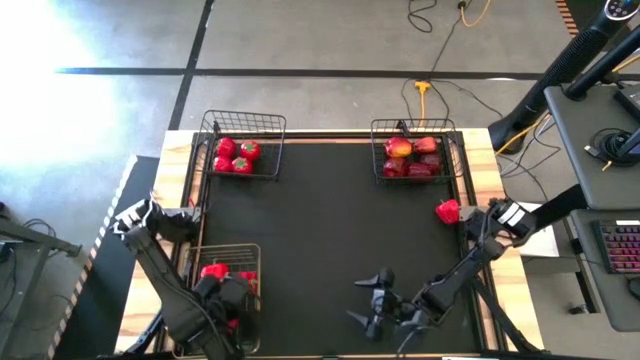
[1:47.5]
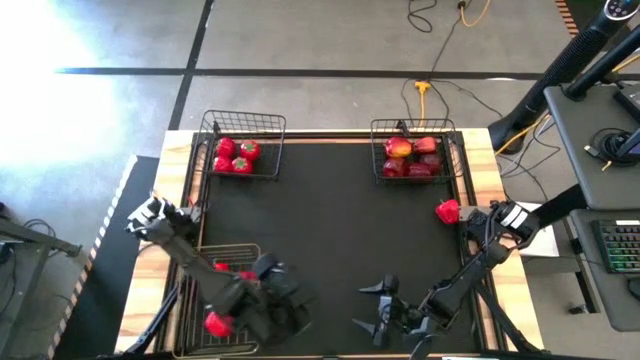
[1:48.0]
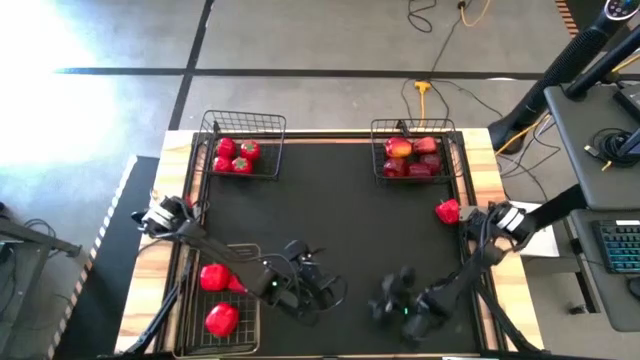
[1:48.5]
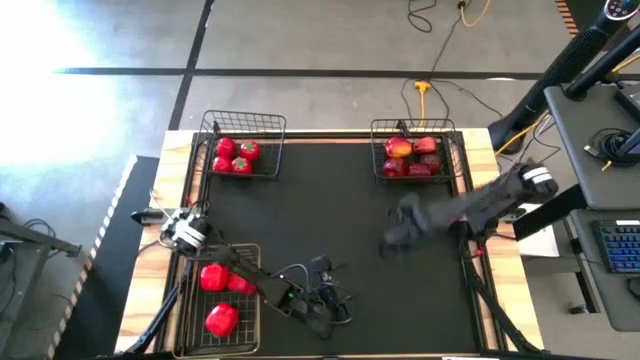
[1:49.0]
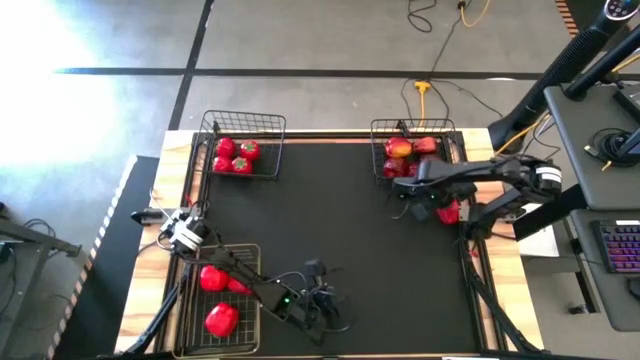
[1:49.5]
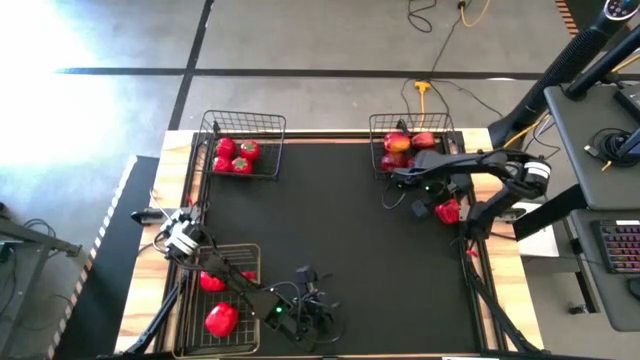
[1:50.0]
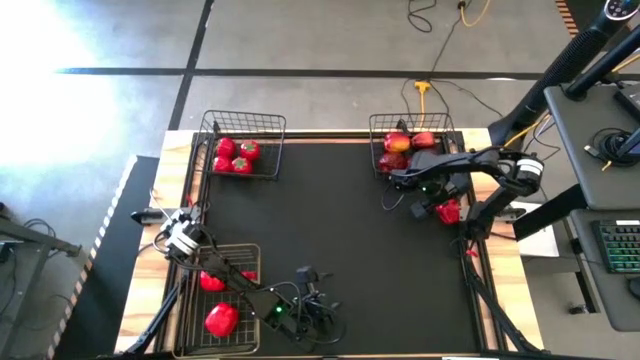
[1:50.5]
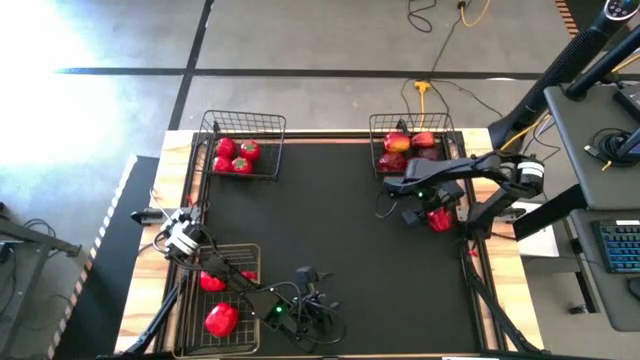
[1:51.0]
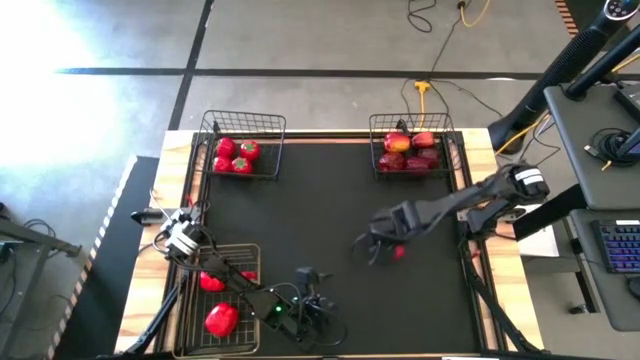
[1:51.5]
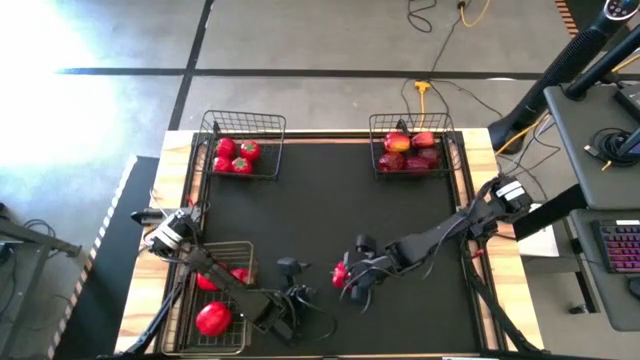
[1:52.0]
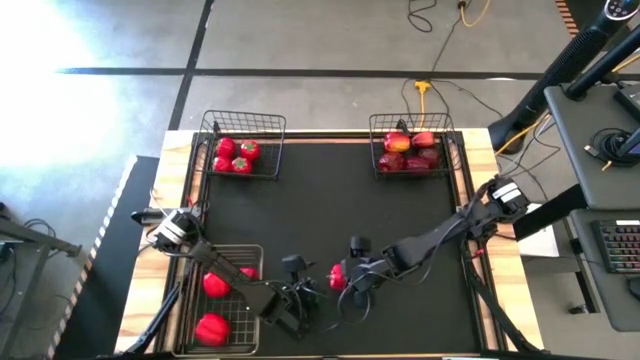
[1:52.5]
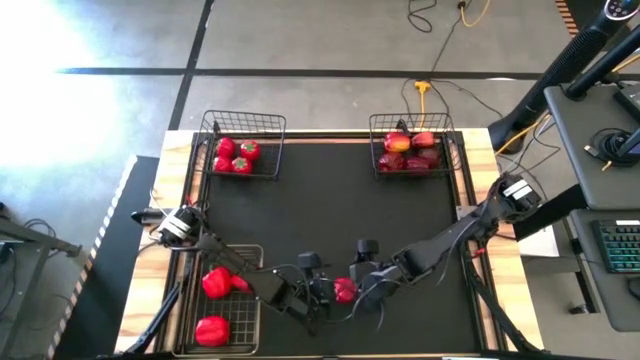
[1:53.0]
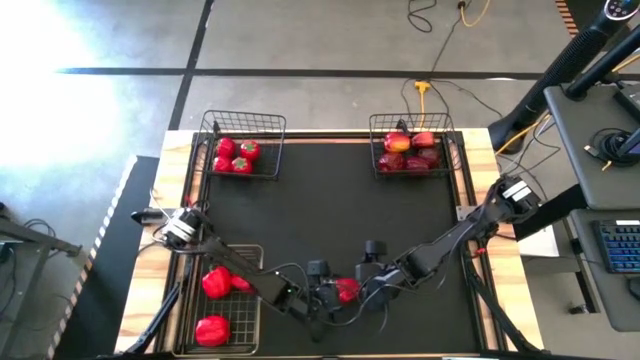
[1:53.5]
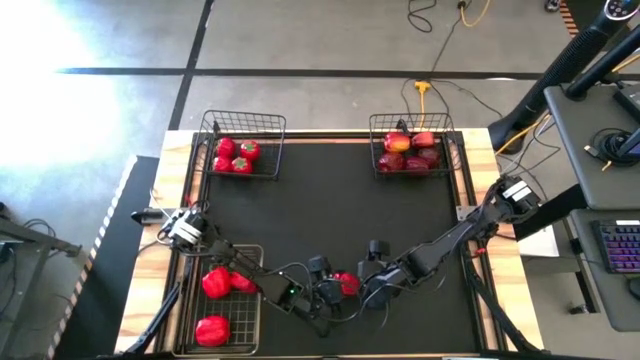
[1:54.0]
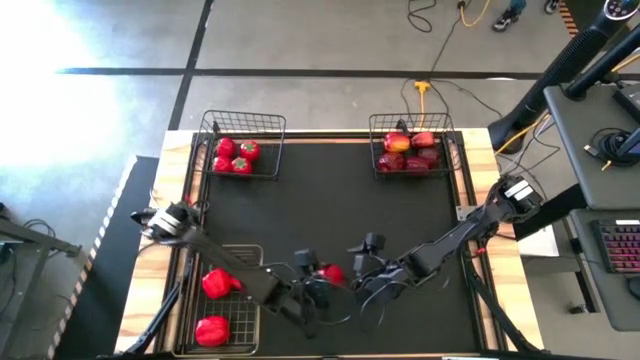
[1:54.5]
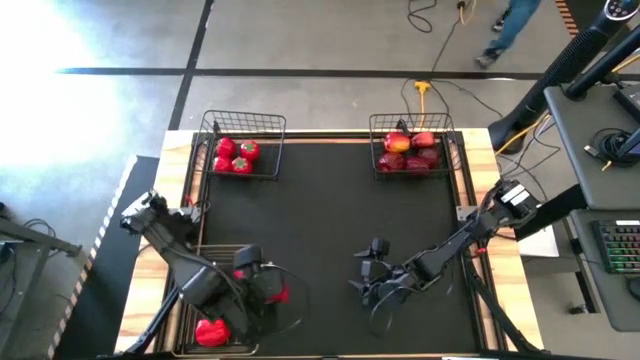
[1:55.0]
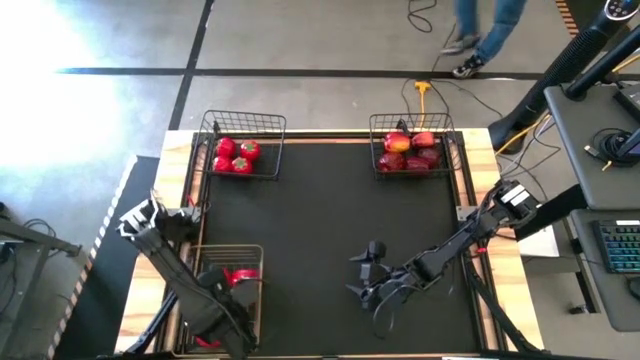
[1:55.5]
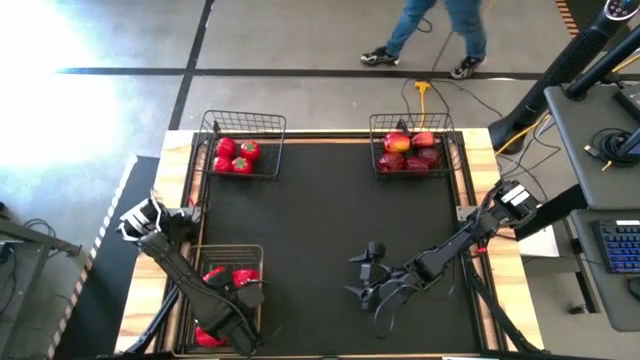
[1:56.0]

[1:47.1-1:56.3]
Task: Sort produce into baskets
Put the bell pepper into the gold wire basket

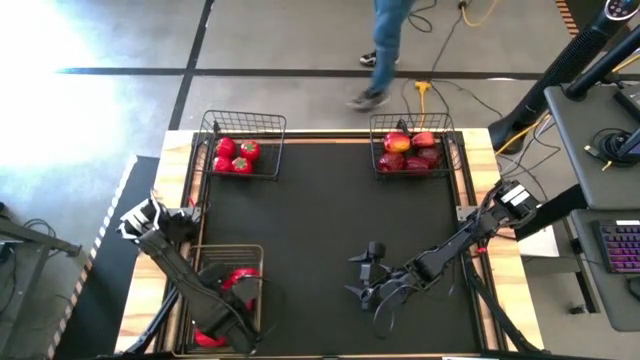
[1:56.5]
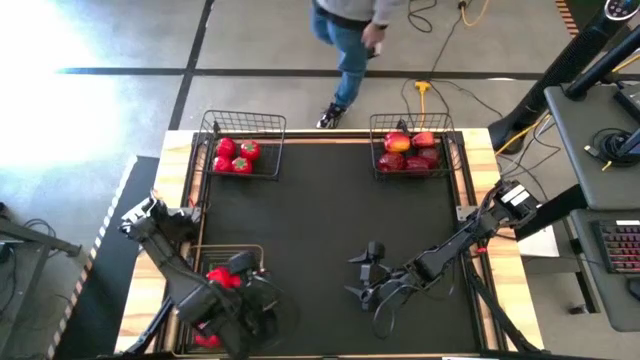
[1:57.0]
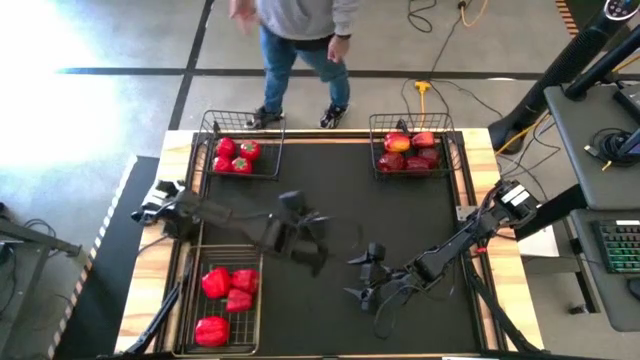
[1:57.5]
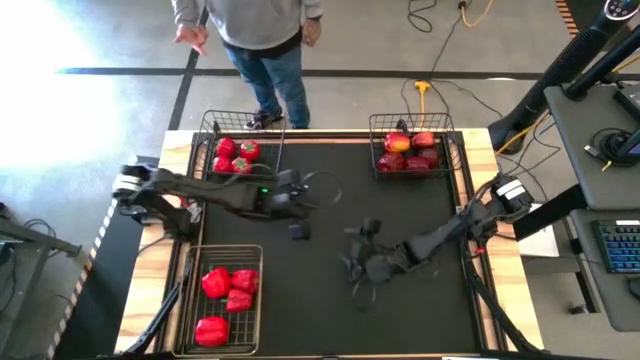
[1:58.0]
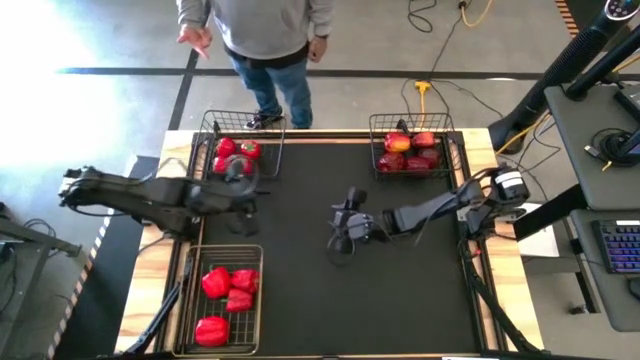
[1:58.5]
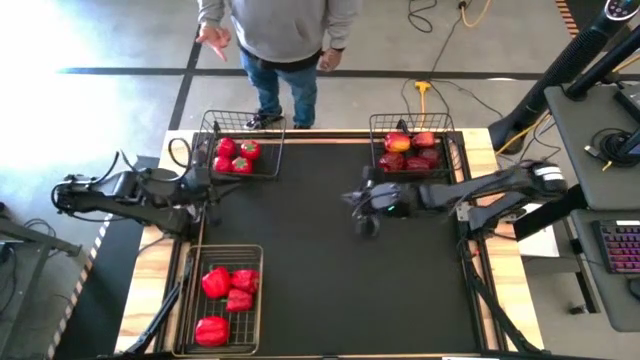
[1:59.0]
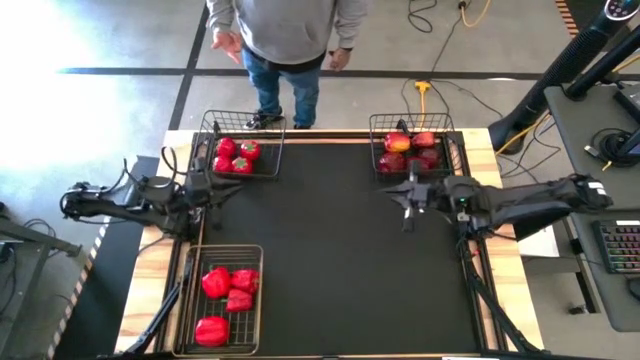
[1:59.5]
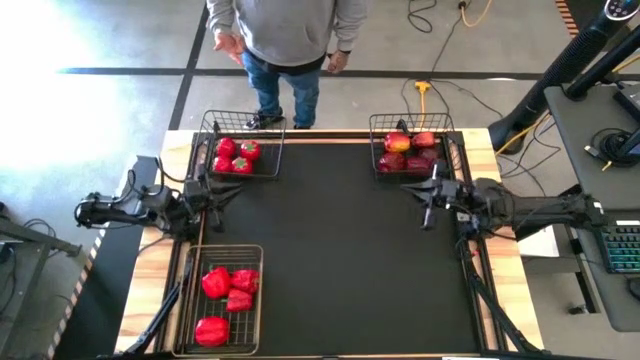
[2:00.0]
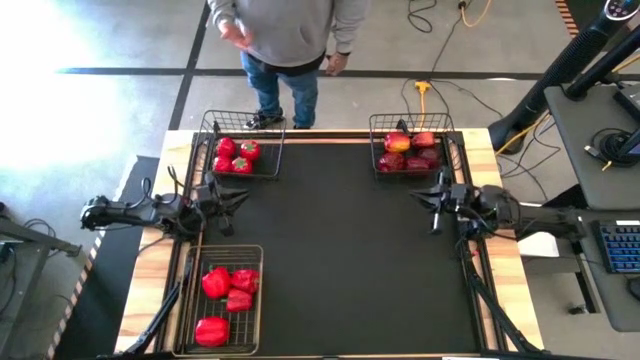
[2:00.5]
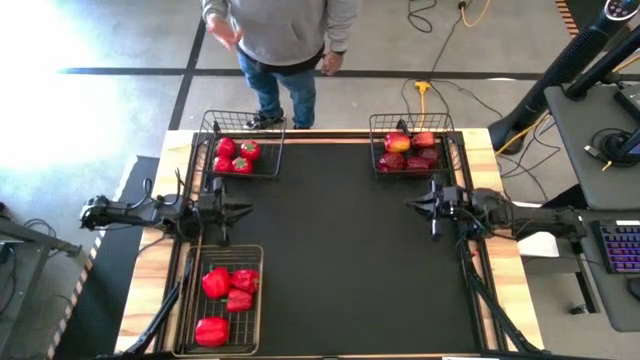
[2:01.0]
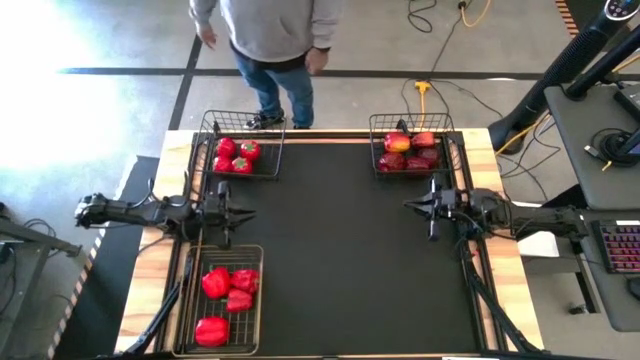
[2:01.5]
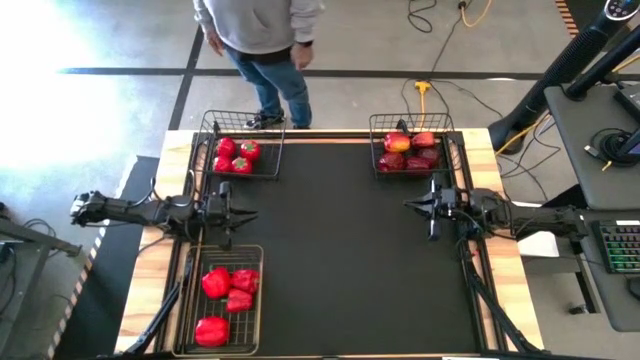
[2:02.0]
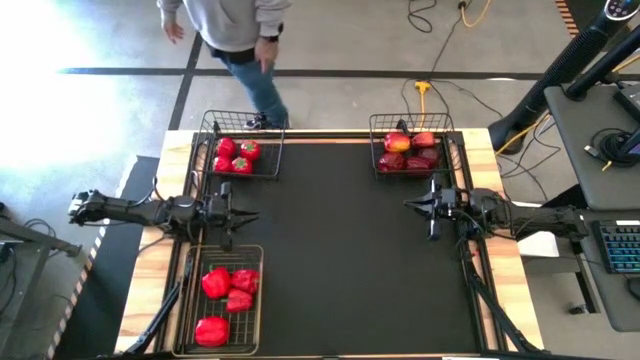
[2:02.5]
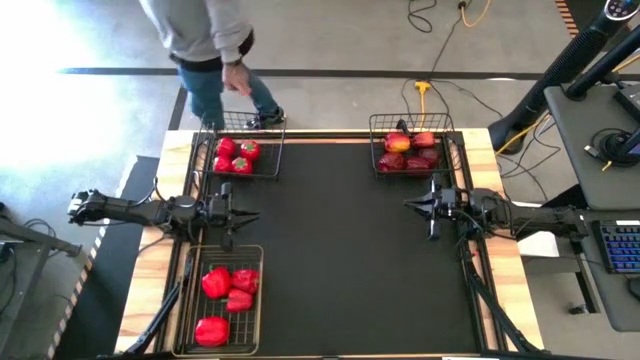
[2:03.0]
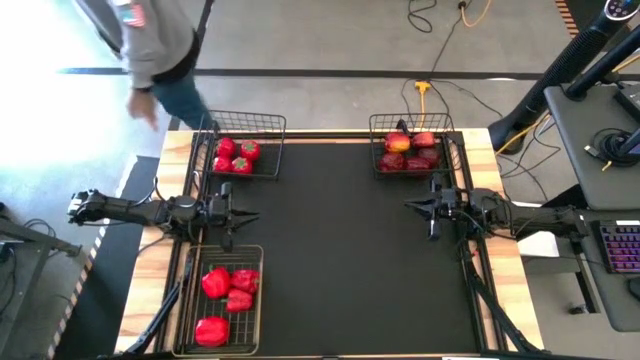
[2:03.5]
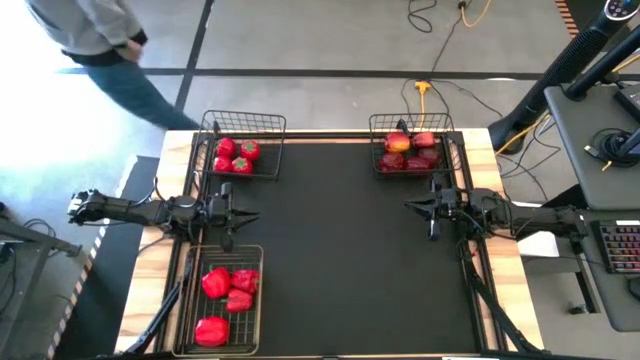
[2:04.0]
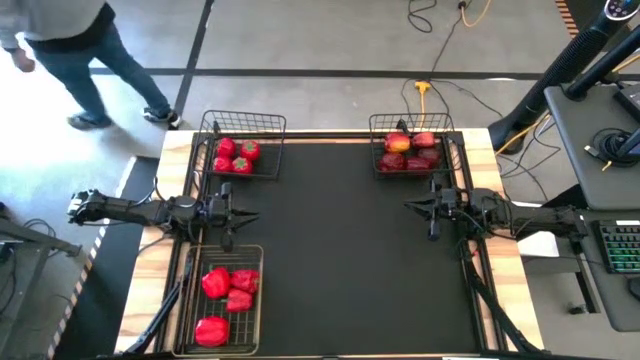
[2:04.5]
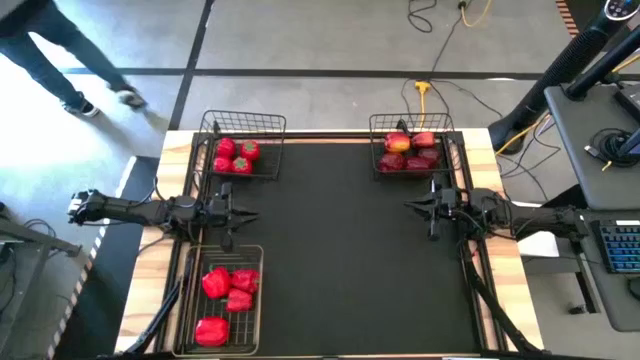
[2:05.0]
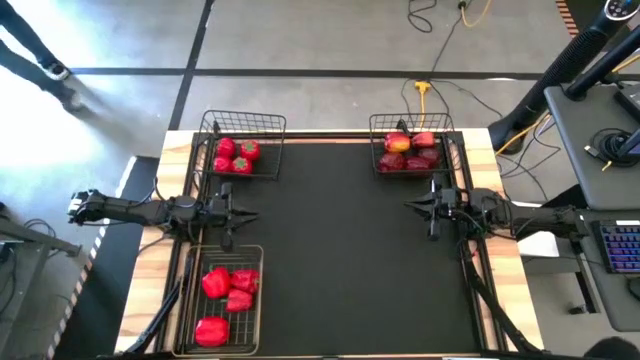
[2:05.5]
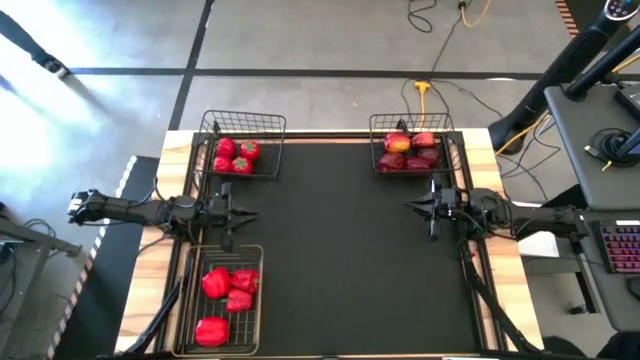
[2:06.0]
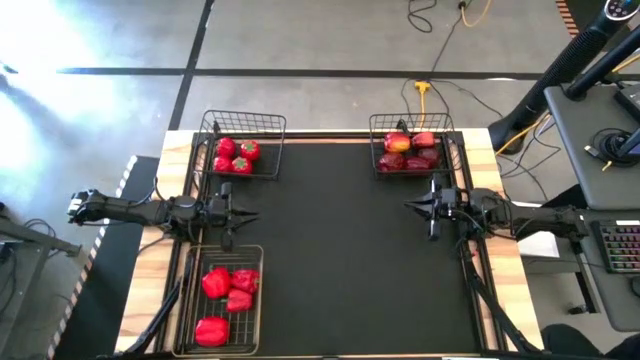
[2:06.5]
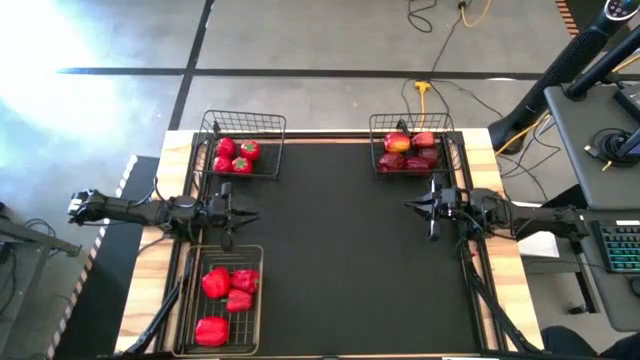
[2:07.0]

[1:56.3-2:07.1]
Return to Home Position

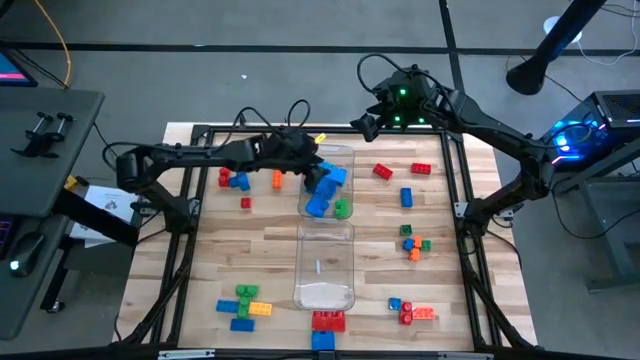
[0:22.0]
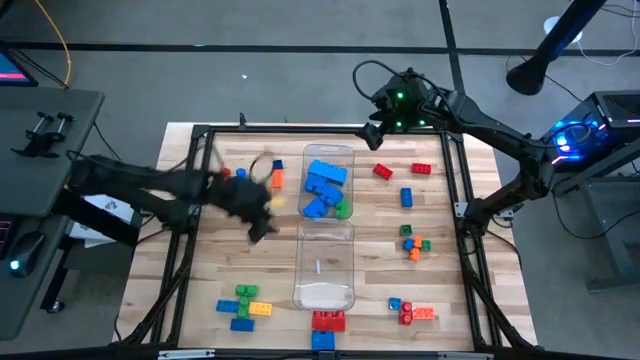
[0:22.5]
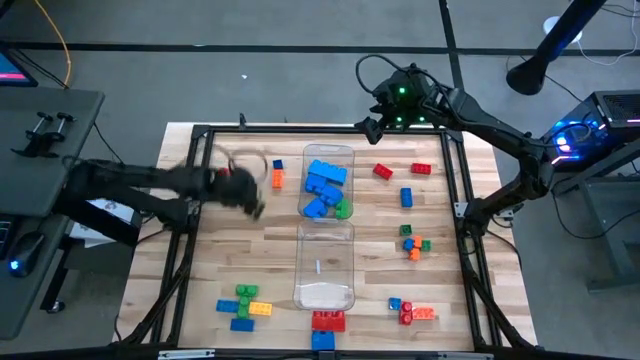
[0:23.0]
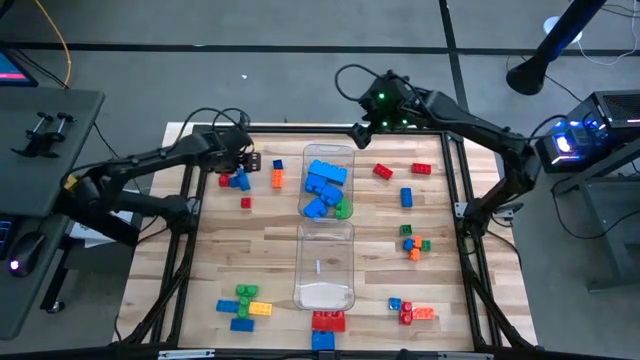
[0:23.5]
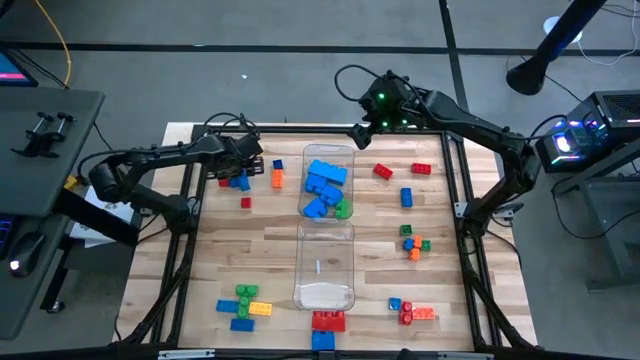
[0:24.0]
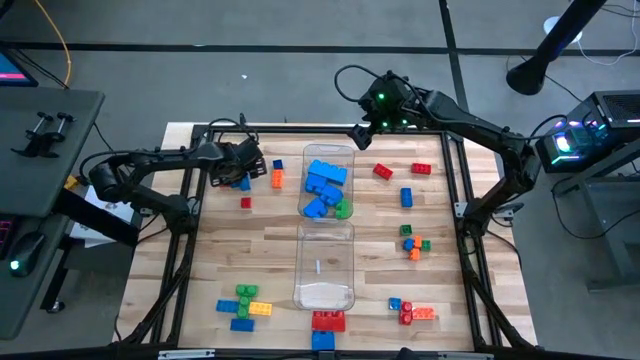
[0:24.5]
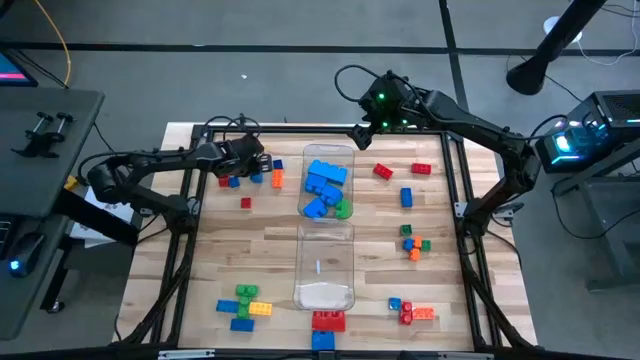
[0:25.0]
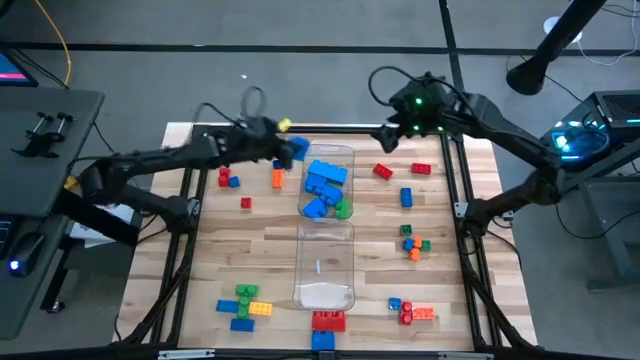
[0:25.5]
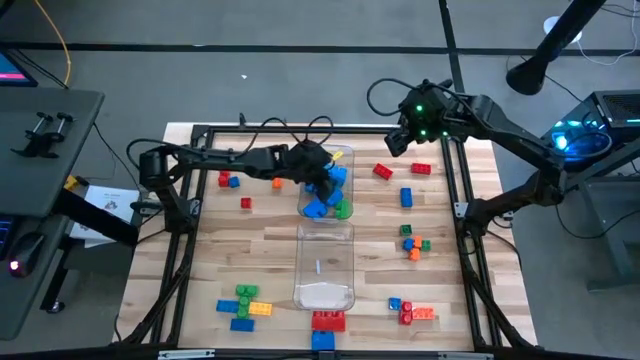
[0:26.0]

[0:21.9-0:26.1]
Task: Sort blocks by size
Put the large blue game piece in the top transparent bin
